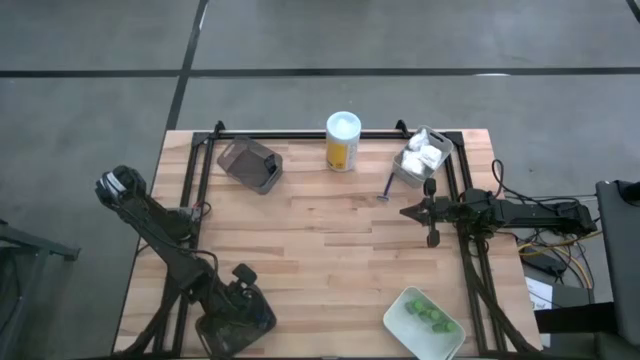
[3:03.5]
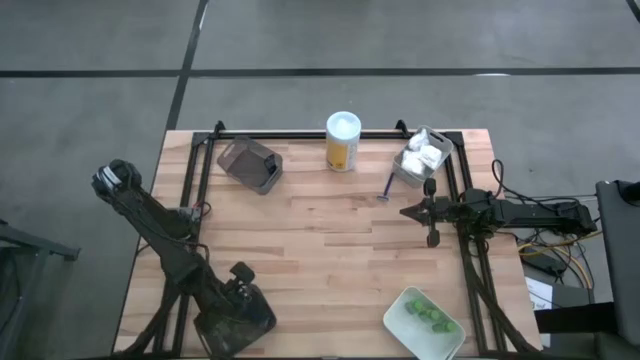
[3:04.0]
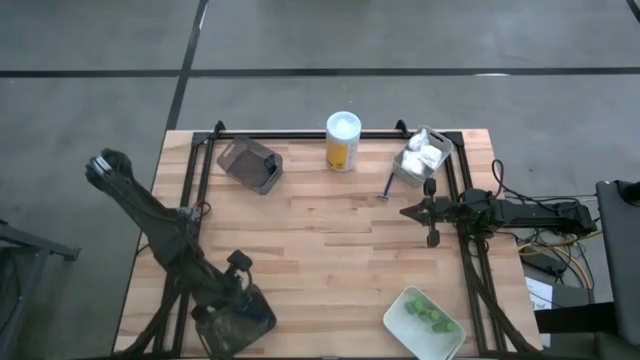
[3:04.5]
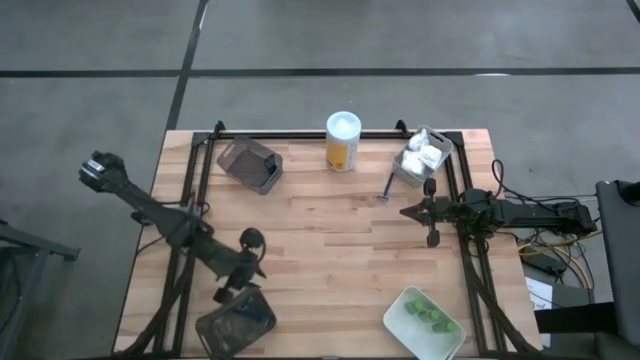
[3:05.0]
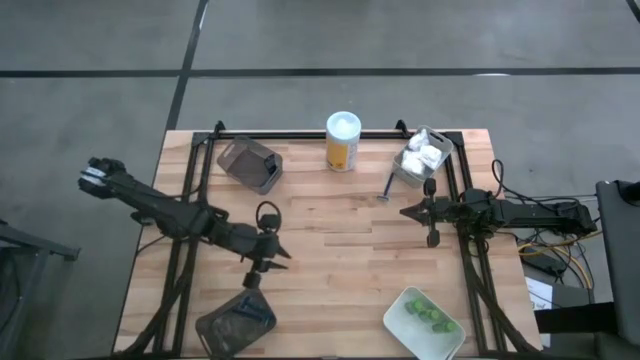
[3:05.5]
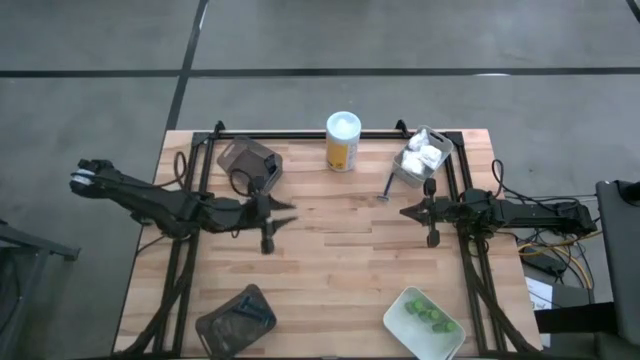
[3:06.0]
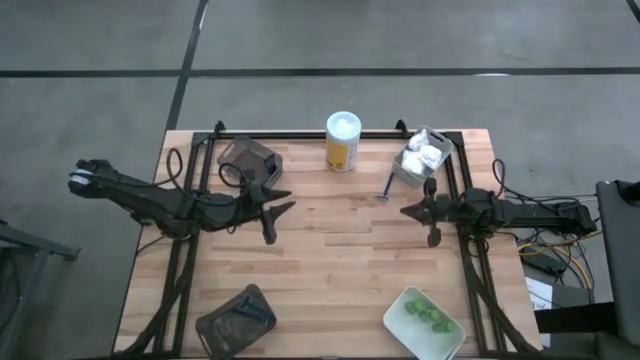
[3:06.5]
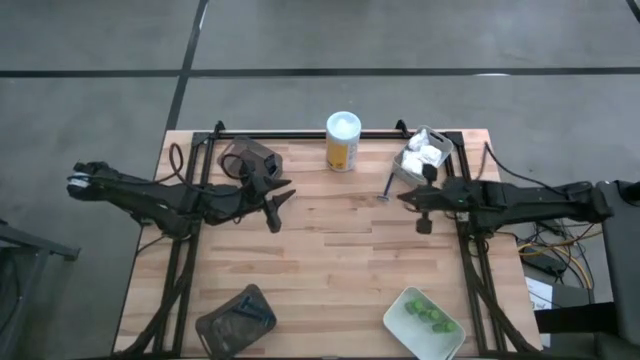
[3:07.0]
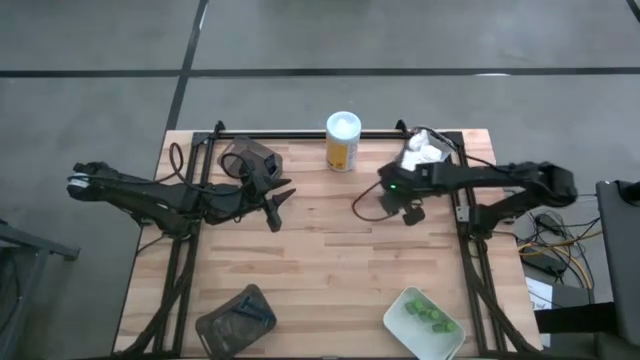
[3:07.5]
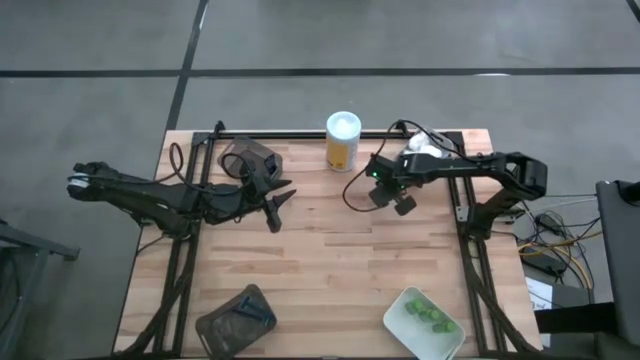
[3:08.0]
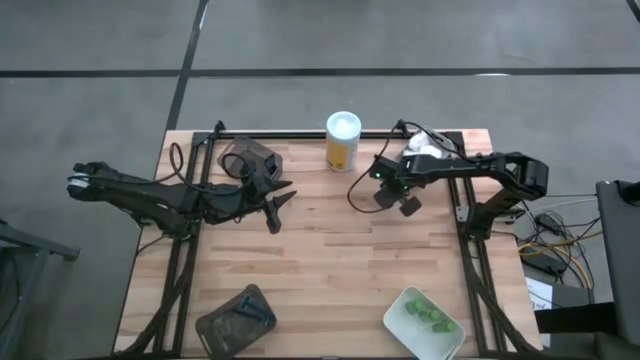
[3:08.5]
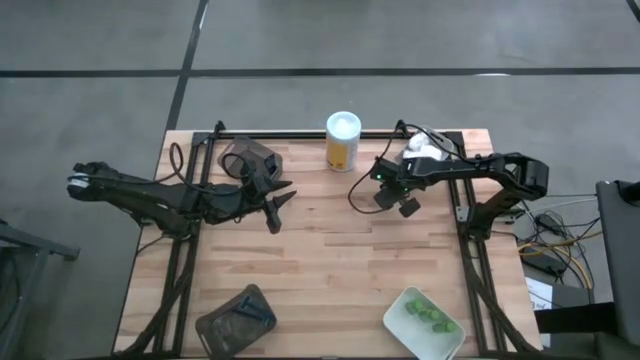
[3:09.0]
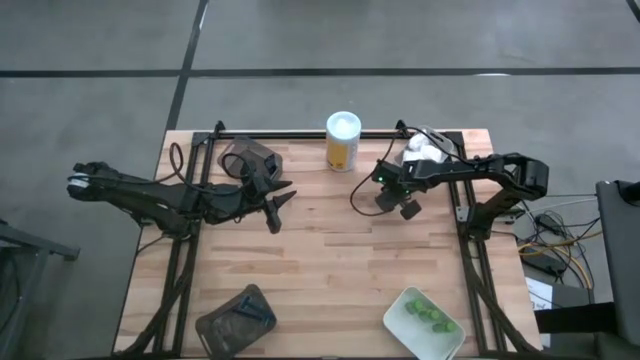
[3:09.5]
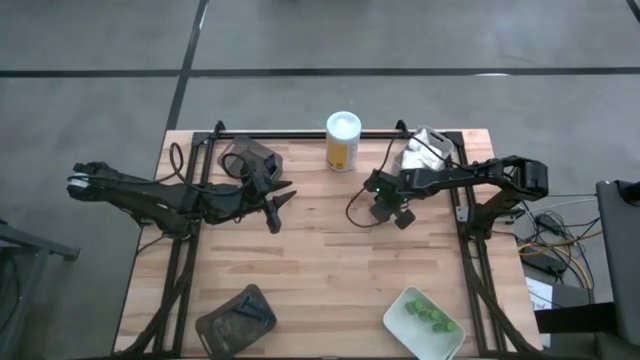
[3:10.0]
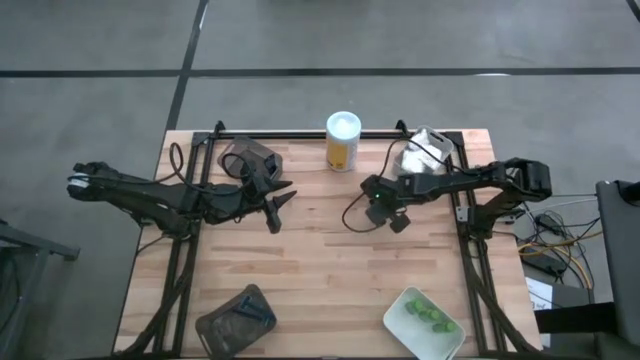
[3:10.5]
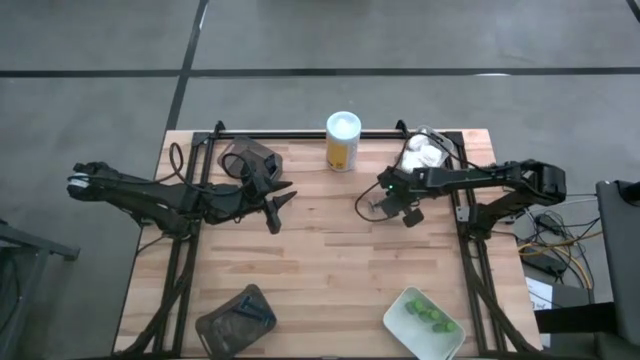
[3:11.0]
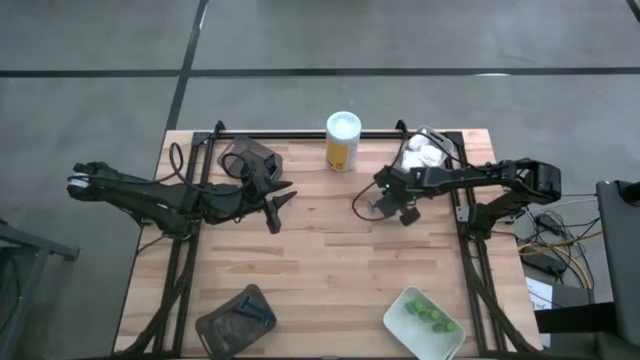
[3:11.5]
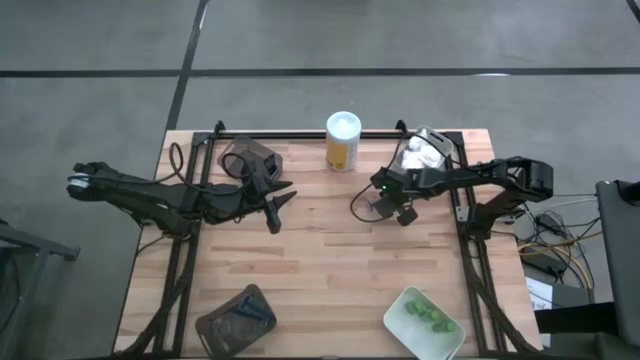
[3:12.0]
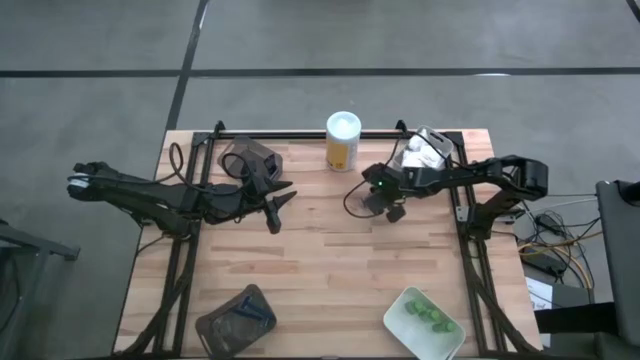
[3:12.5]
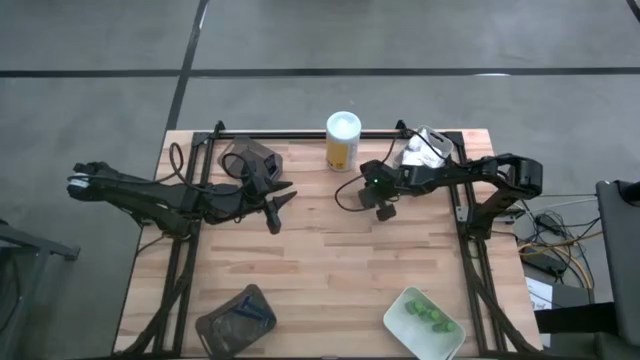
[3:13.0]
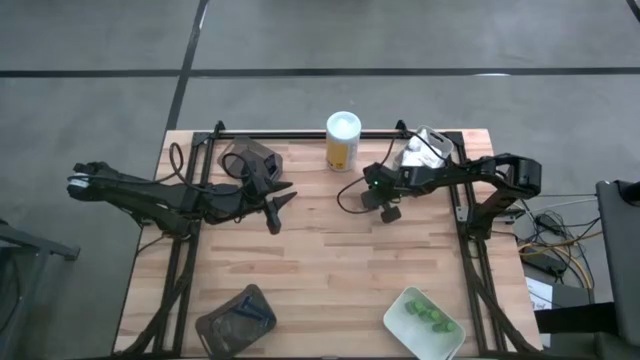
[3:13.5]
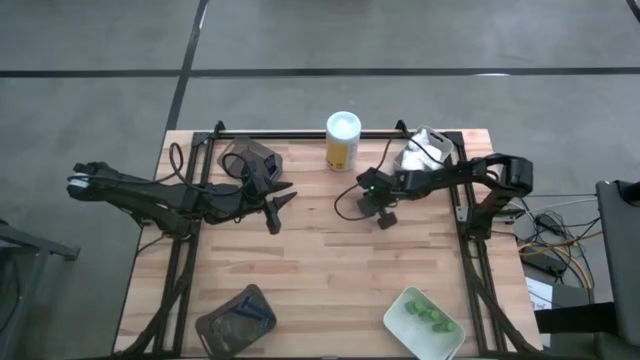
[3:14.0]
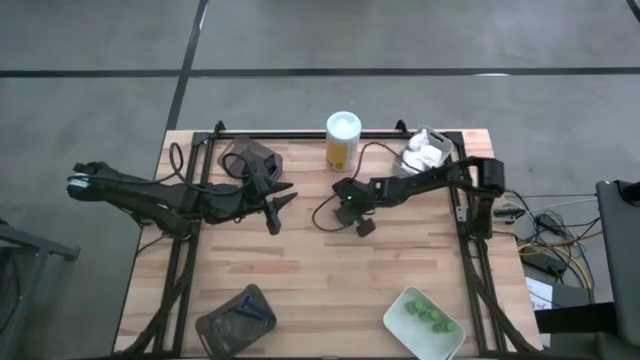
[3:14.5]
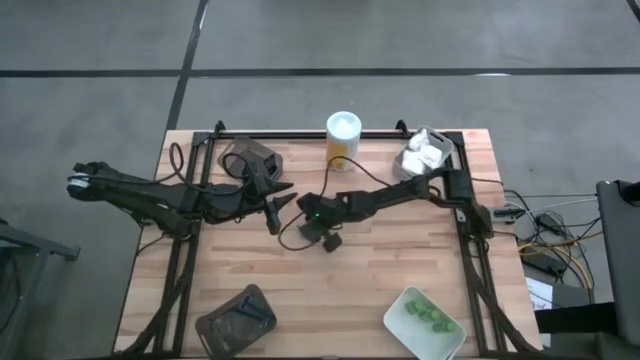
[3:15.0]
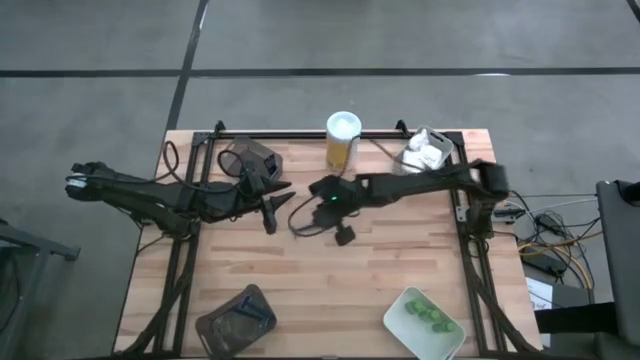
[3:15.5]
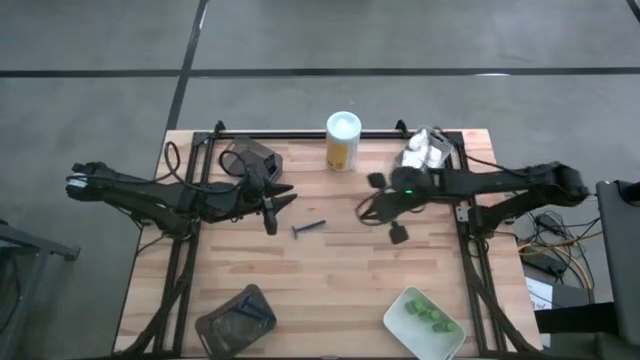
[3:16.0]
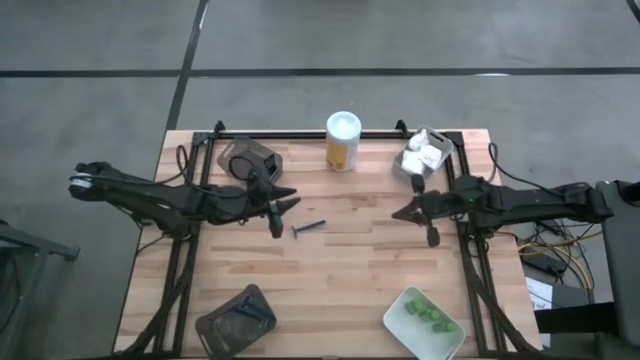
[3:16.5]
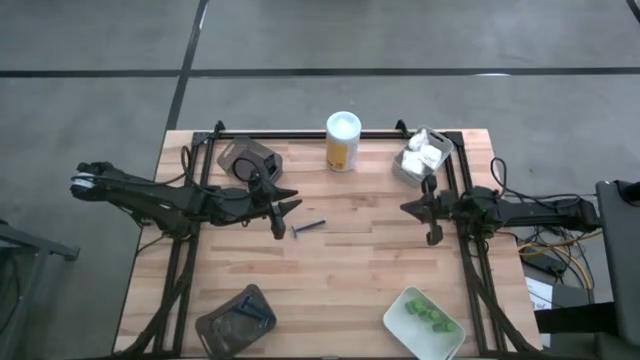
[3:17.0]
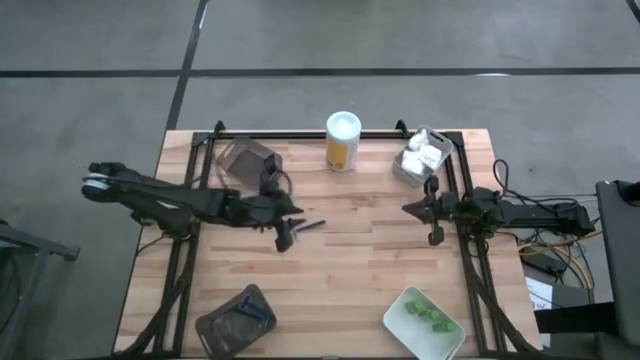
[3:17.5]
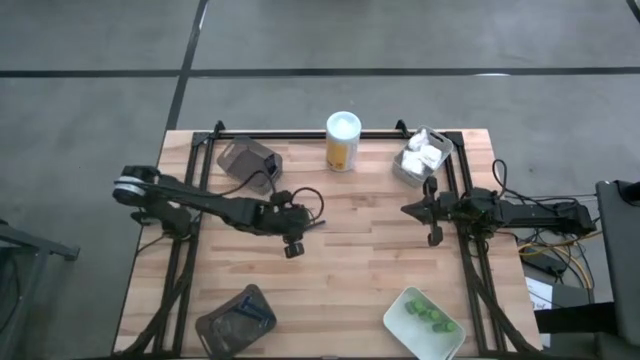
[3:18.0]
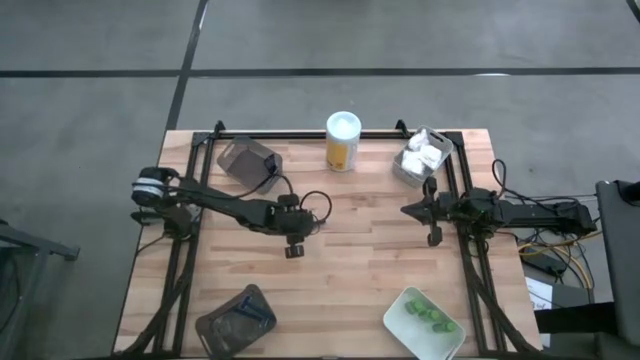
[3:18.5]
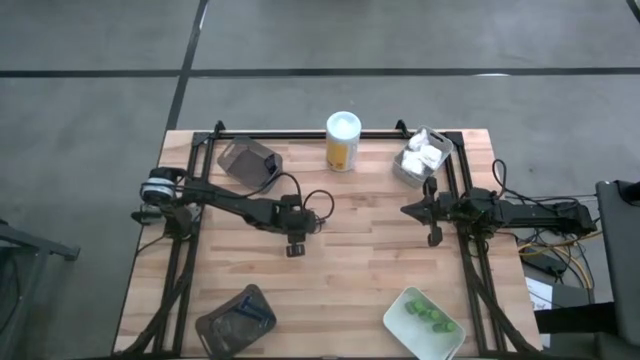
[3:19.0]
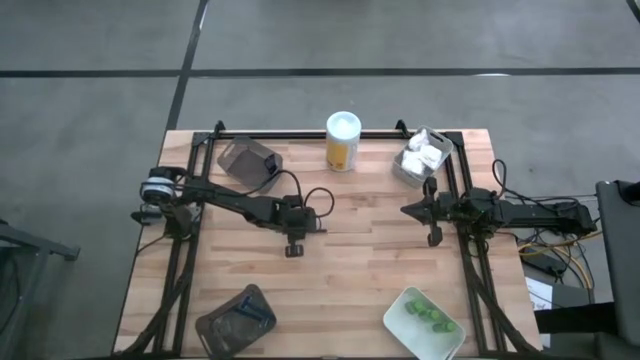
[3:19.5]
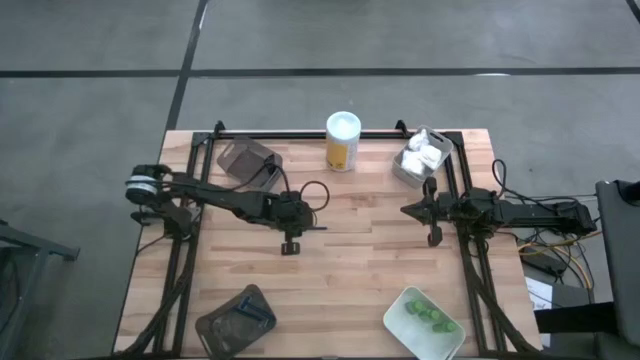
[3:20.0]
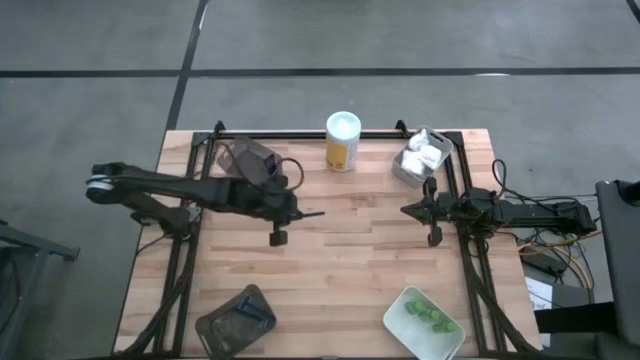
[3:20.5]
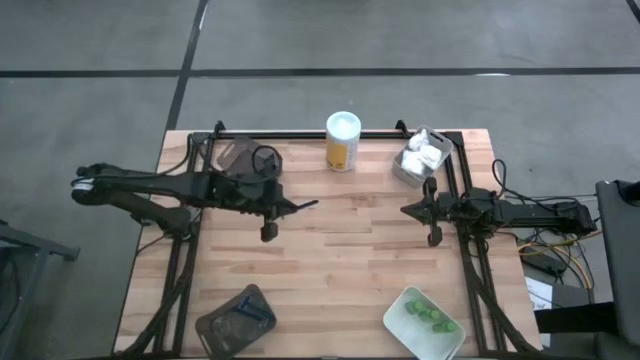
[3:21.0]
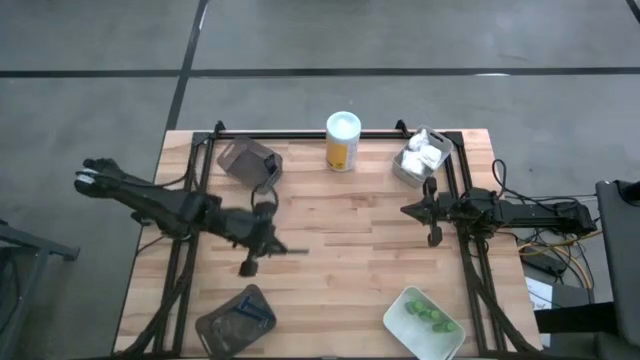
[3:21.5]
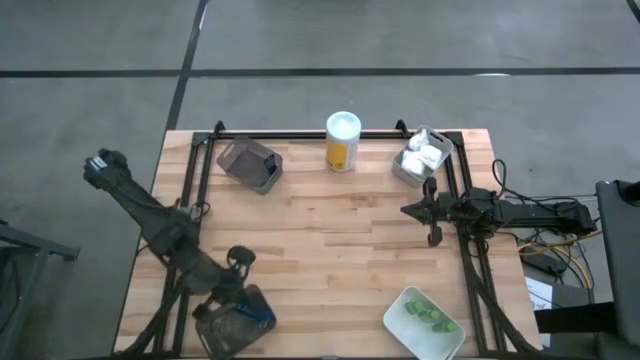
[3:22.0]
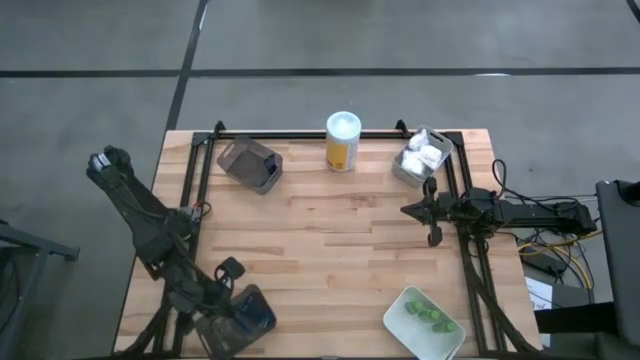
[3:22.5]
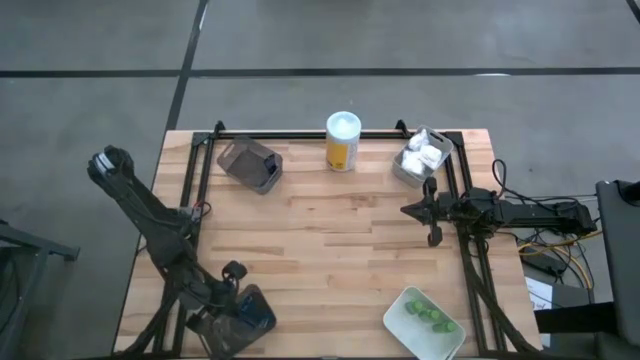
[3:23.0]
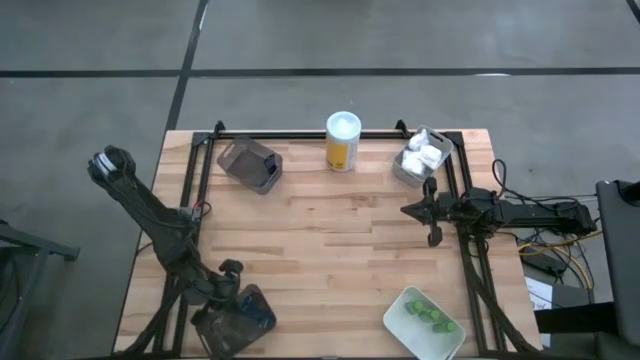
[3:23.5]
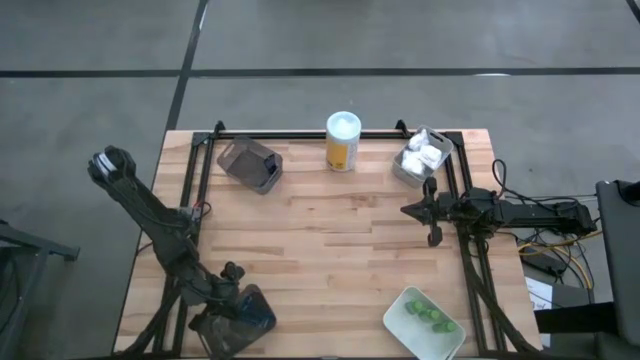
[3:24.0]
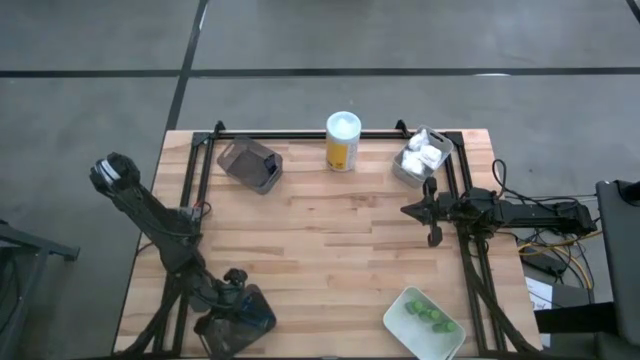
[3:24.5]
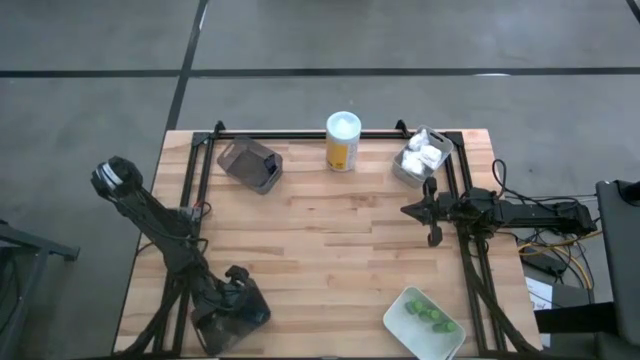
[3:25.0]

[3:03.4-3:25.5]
Task: Pick & Place Travel size toiletries
Put the blue razor into the bottom black bin

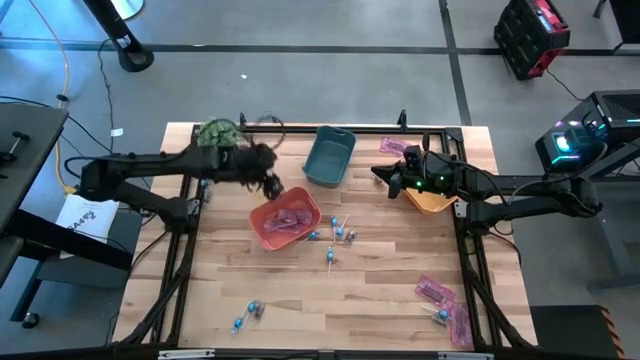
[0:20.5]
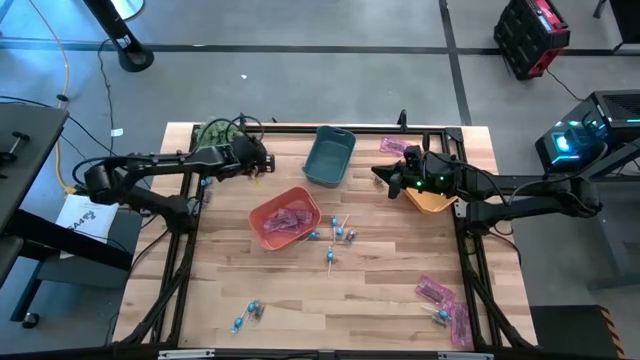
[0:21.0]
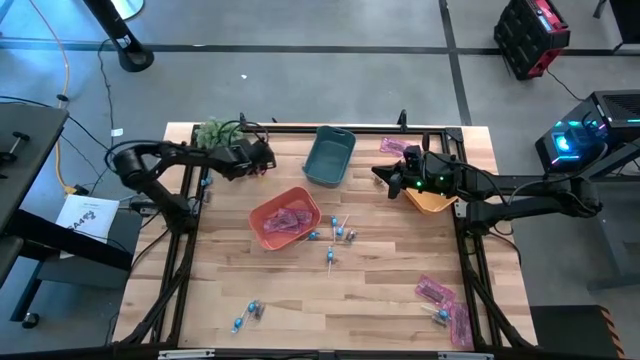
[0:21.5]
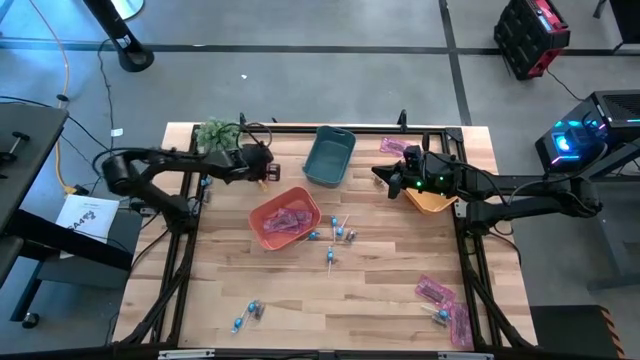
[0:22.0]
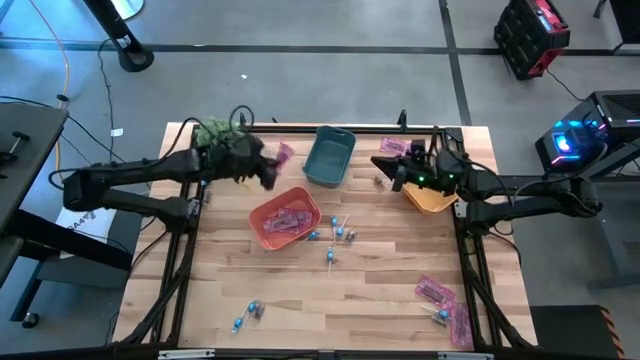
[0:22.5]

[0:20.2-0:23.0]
Task: Sort candy
Put the red candy into the orange bin
